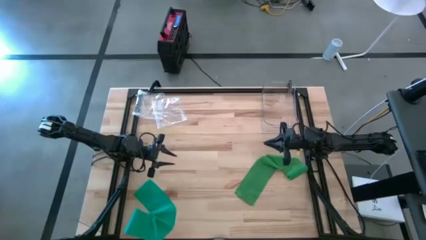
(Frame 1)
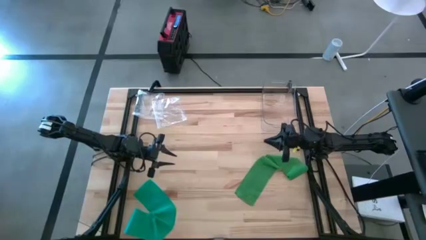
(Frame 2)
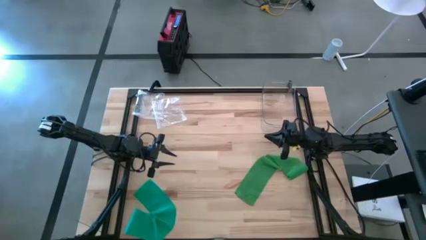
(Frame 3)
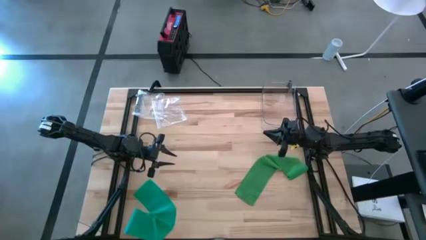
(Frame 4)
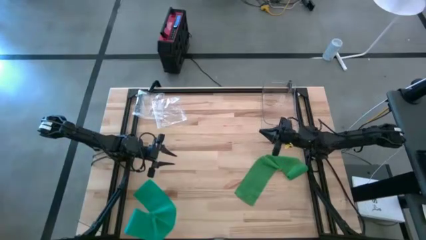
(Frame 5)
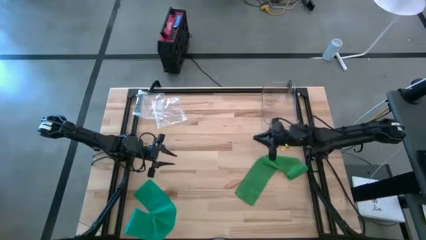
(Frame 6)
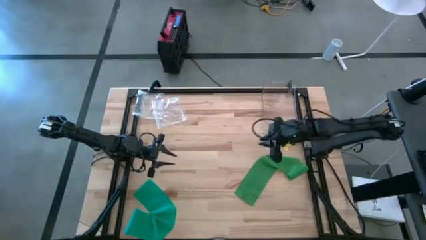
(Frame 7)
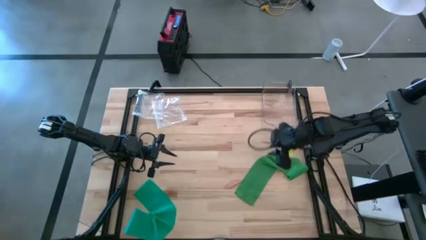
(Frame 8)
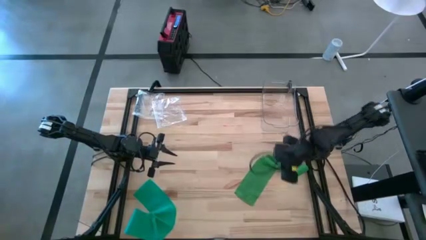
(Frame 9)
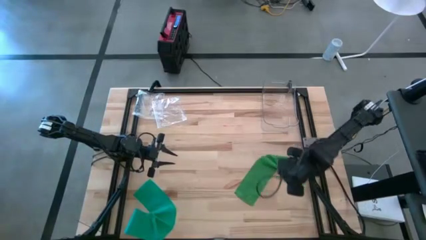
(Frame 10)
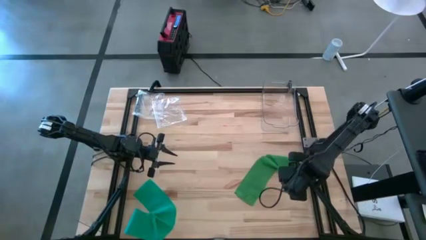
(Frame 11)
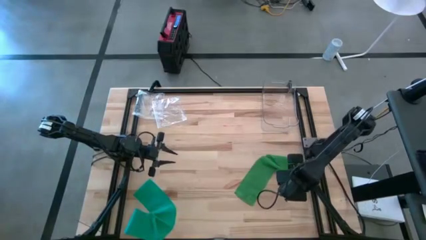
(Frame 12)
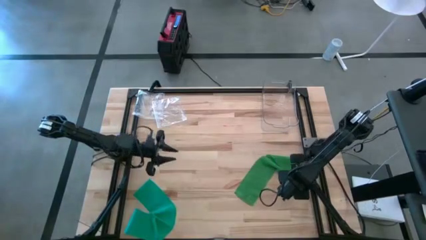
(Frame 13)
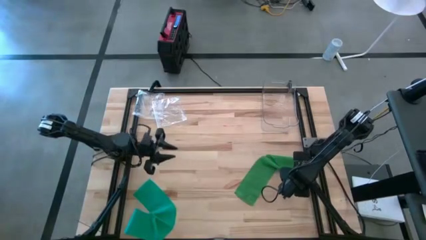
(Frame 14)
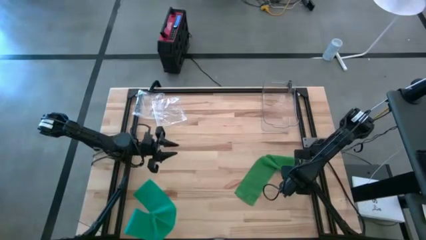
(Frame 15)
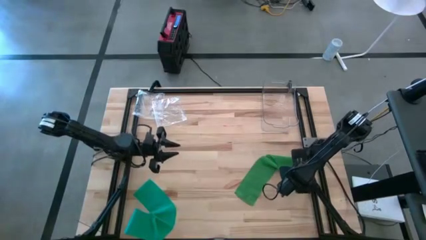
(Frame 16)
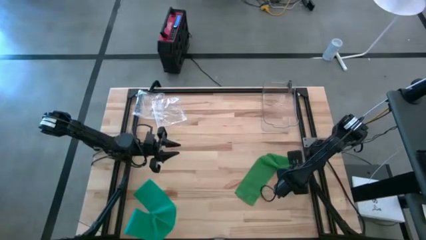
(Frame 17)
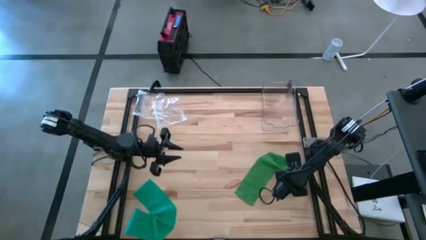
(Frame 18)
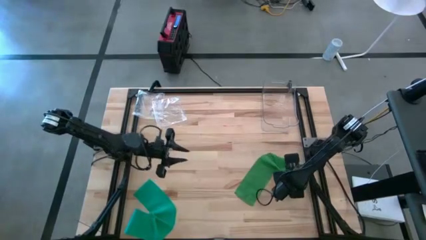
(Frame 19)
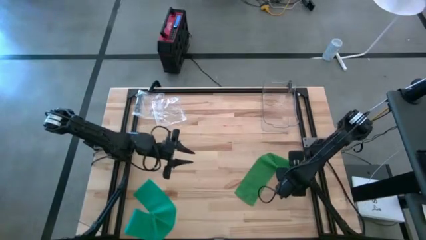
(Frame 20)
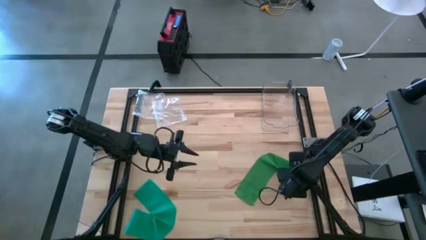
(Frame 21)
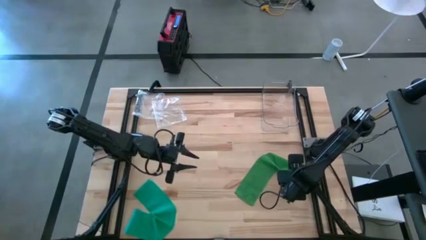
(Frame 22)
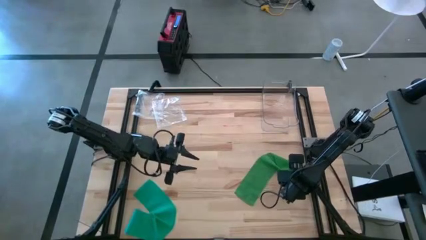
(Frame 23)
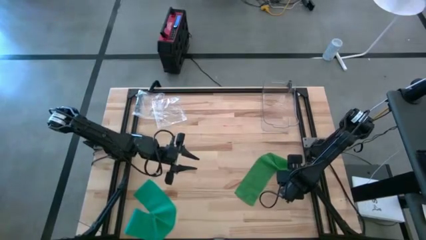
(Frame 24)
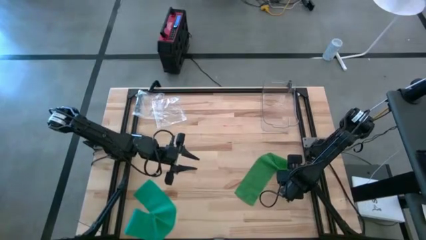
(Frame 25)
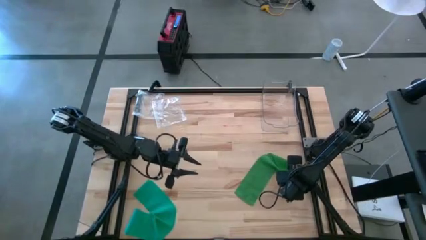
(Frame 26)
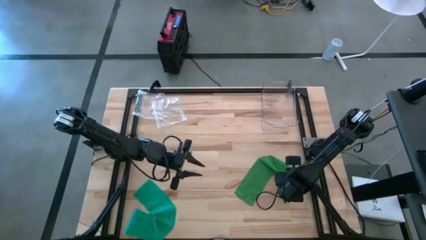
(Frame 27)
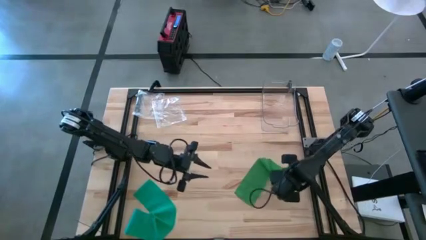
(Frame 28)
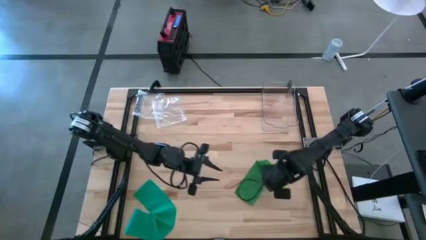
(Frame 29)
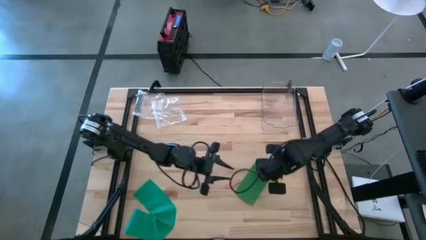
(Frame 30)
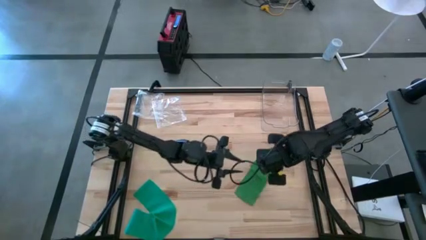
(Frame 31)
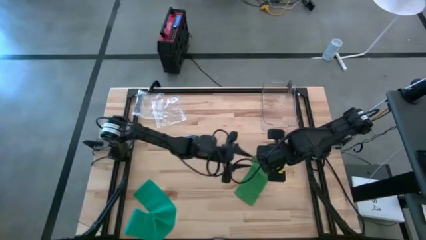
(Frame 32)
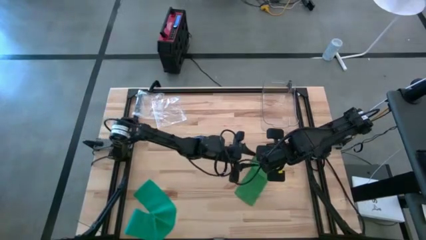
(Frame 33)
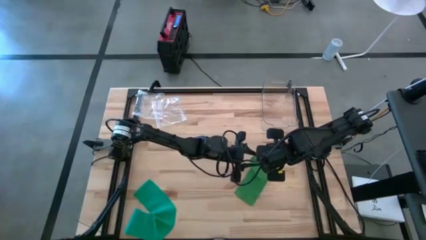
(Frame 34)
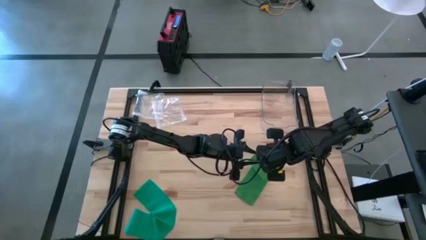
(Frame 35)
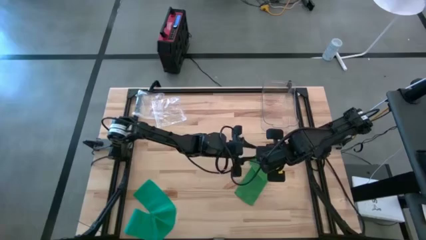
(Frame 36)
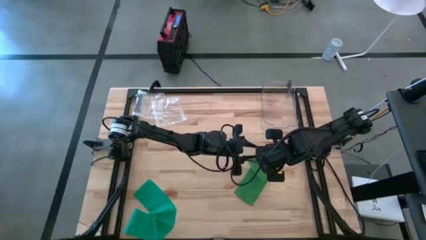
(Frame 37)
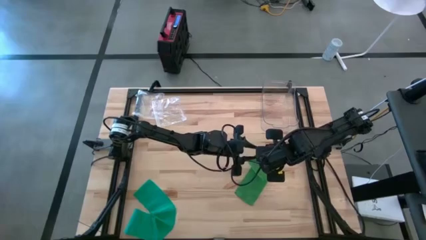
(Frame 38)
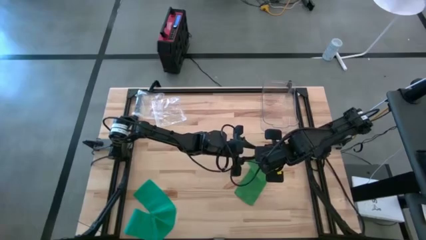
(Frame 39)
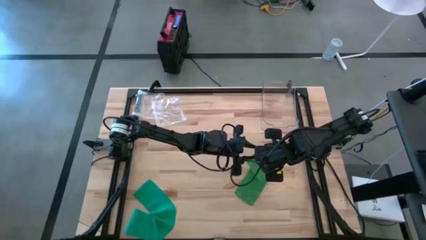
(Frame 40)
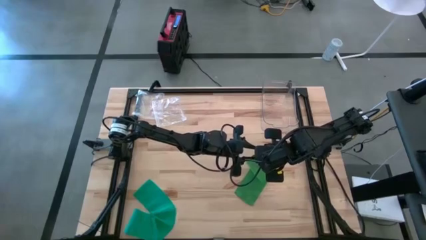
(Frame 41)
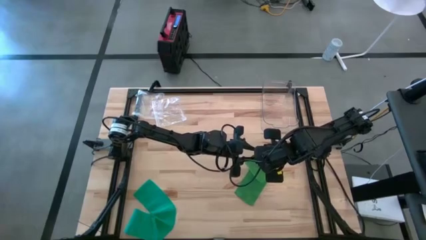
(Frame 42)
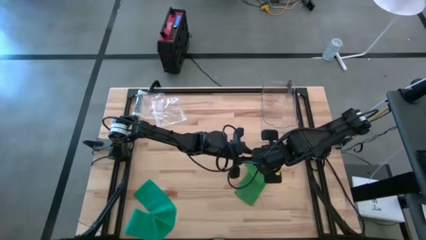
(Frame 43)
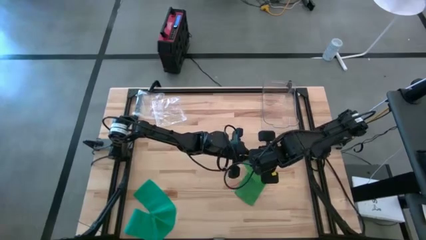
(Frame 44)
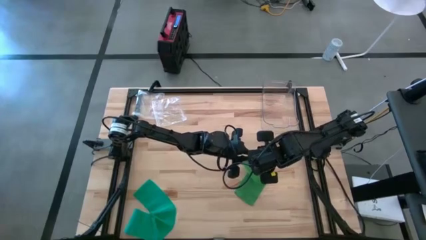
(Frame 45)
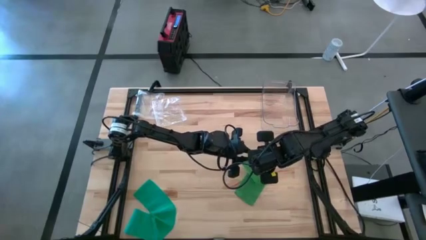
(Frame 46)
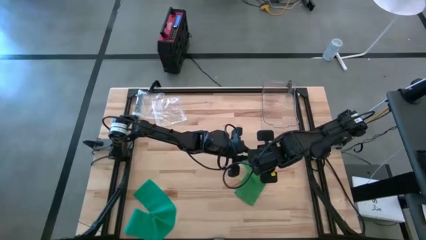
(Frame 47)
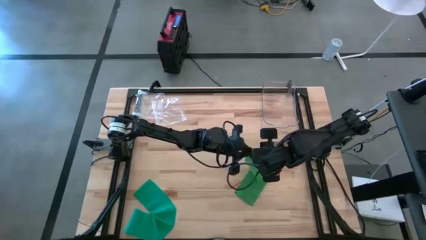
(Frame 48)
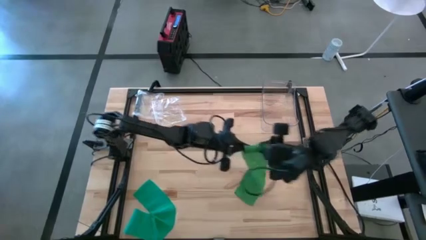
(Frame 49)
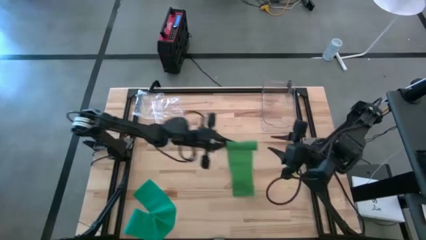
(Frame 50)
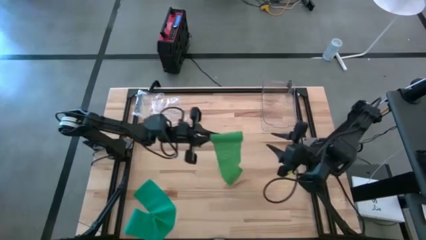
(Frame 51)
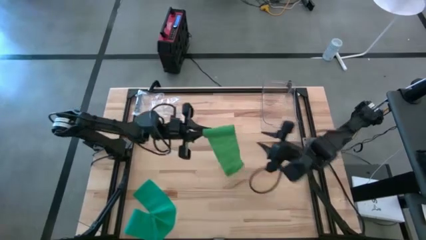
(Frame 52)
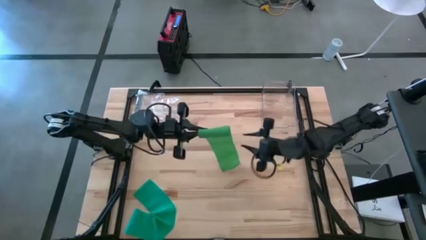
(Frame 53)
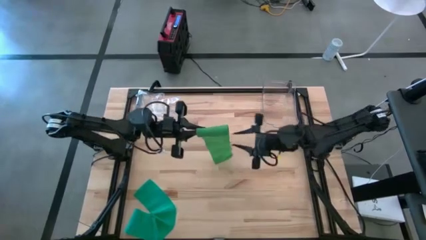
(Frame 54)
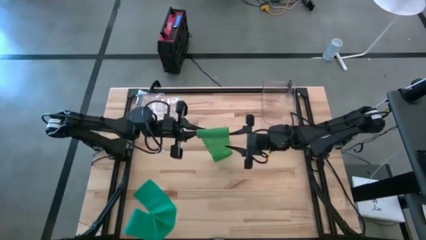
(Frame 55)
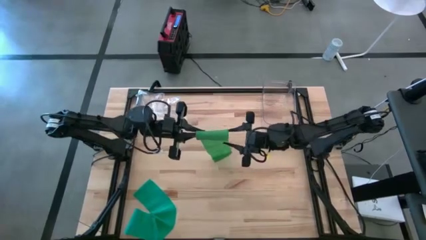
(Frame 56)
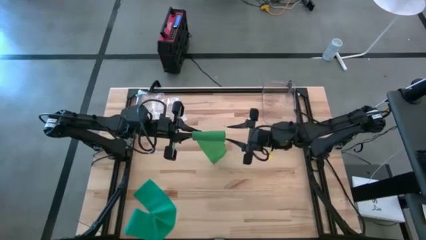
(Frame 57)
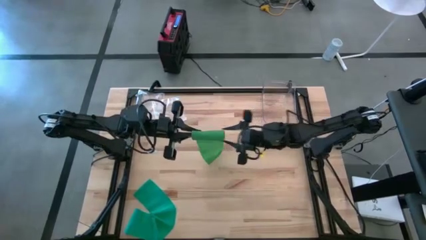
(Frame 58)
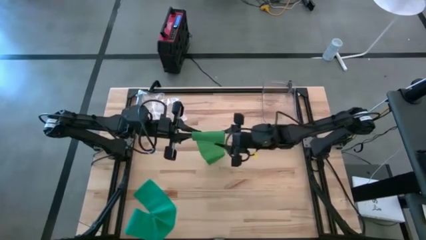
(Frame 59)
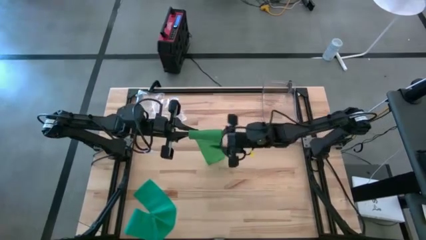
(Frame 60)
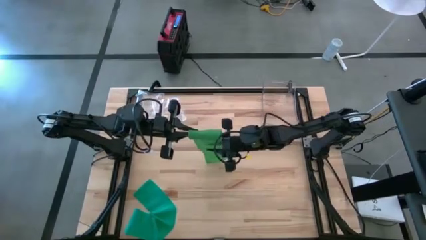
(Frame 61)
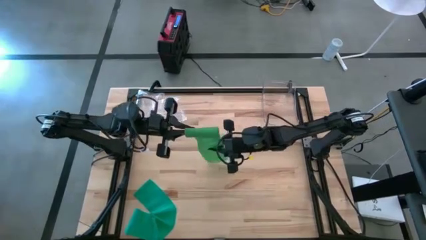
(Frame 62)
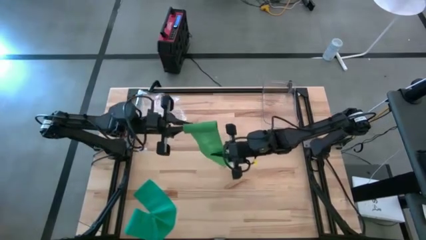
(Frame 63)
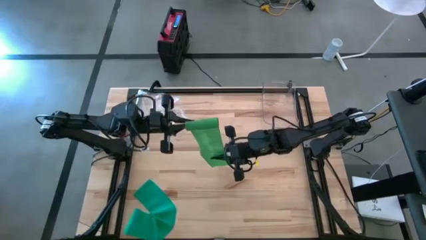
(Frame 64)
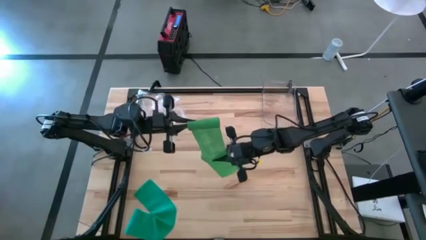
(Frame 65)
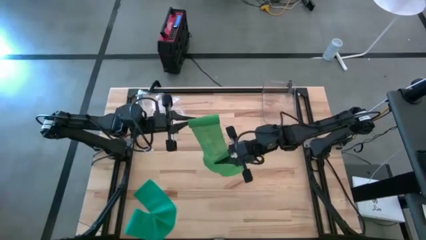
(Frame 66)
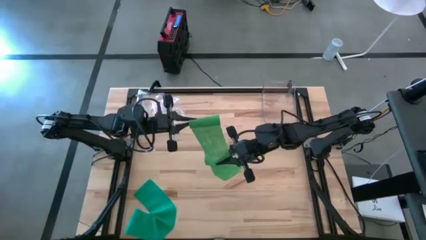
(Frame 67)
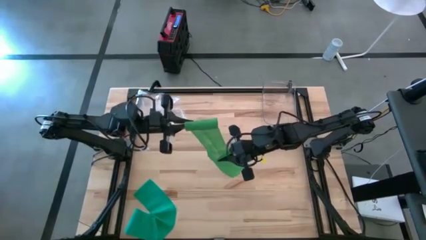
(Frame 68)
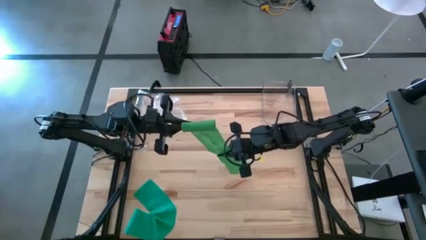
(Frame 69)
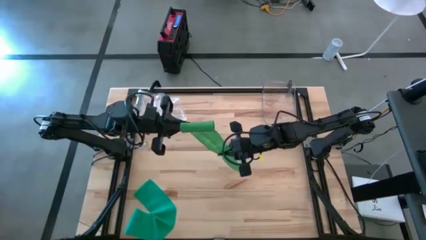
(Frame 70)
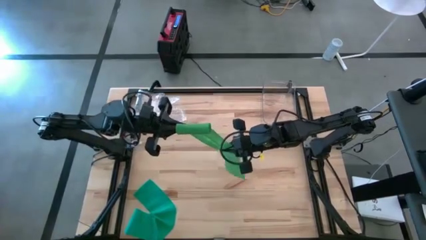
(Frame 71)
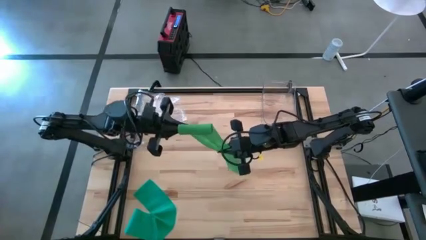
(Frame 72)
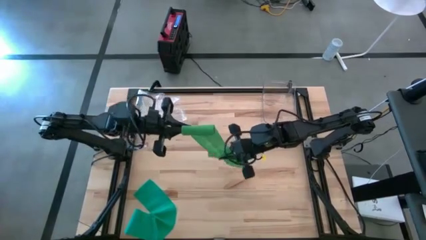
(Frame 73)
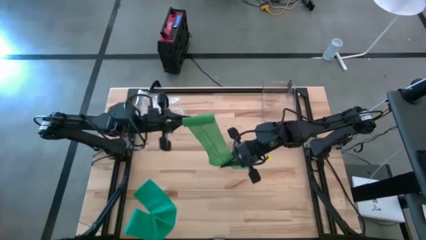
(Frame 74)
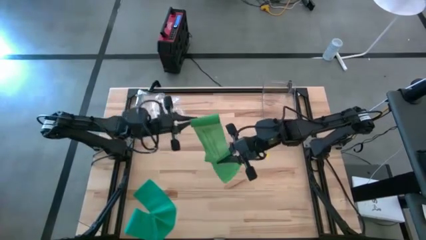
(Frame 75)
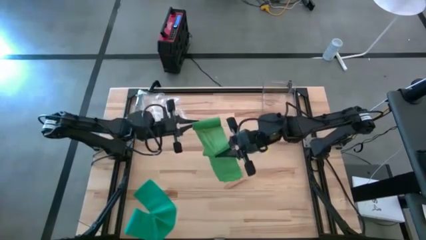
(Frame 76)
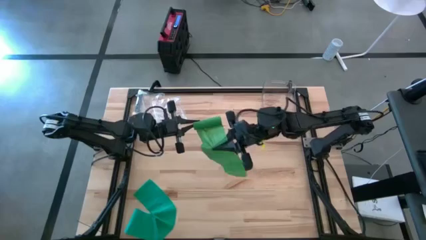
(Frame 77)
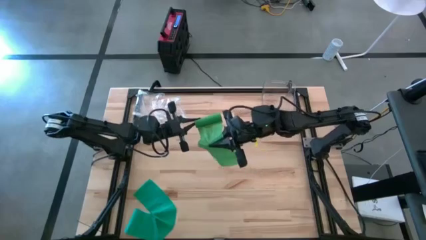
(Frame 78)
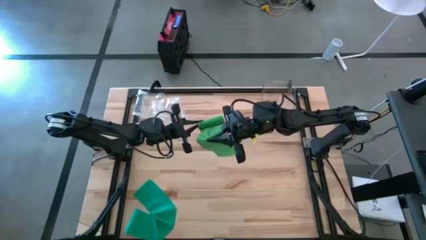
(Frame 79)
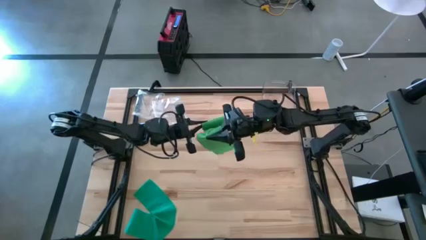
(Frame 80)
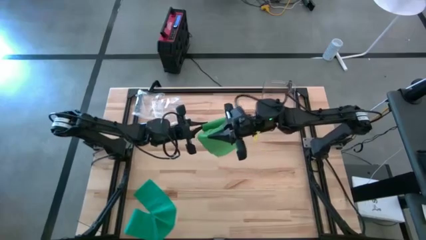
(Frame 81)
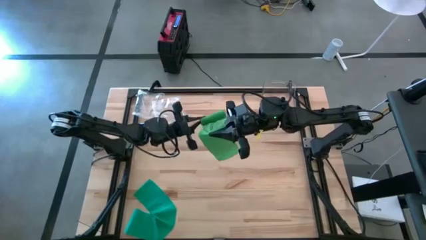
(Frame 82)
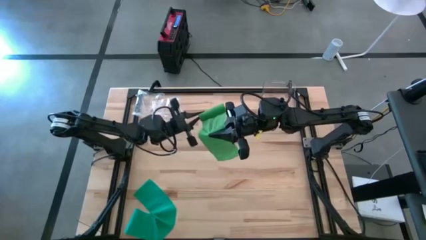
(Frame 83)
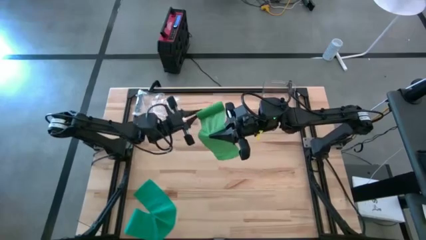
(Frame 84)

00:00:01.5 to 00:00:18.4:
Task: Roll bandage
Roll the green bandage
